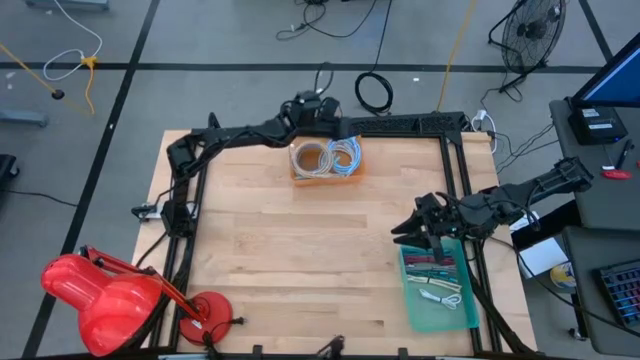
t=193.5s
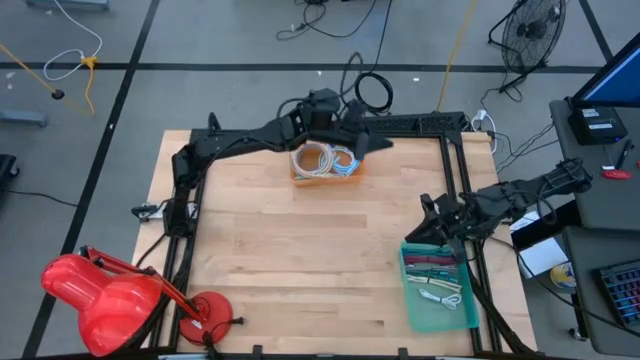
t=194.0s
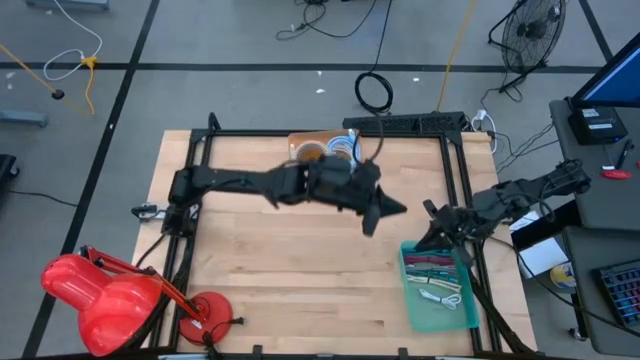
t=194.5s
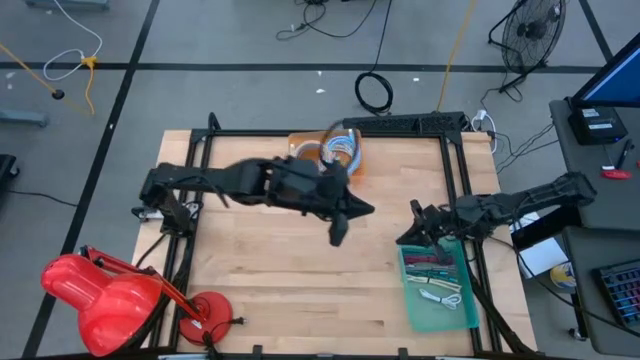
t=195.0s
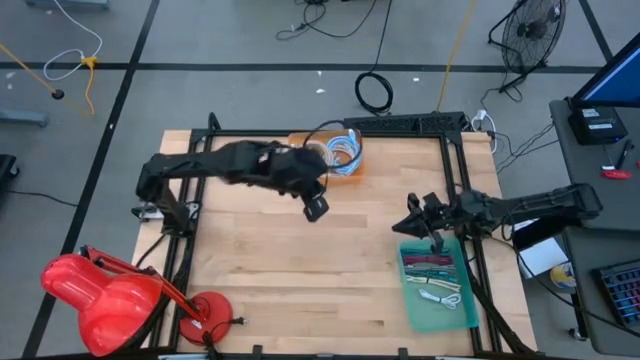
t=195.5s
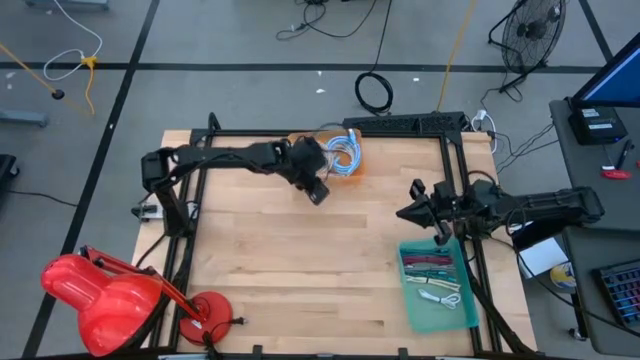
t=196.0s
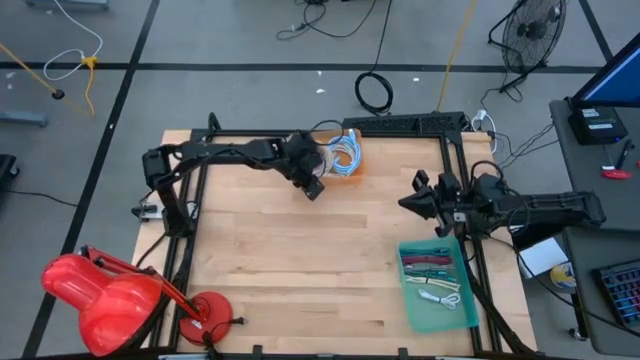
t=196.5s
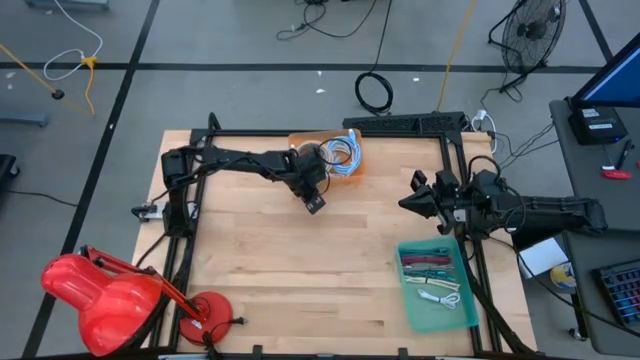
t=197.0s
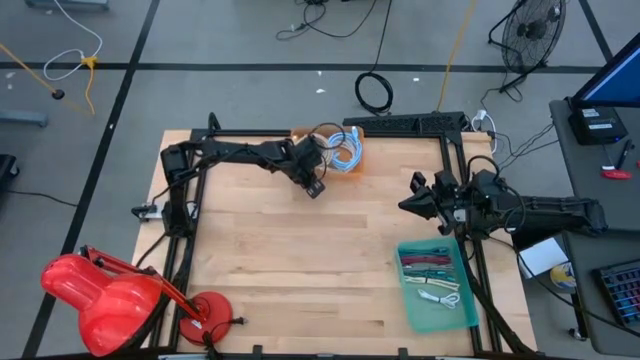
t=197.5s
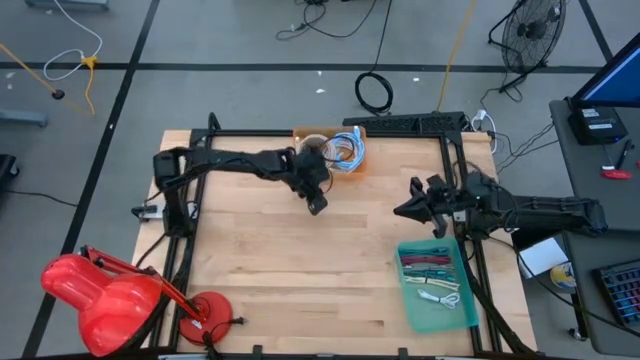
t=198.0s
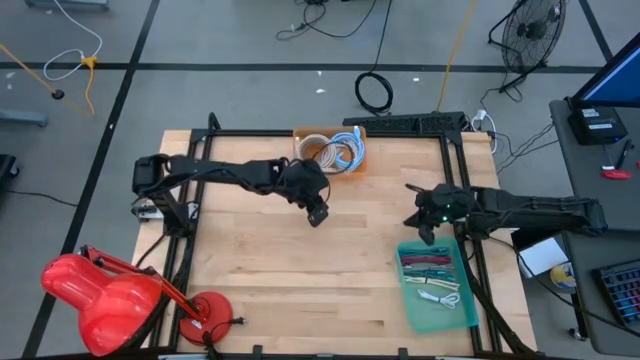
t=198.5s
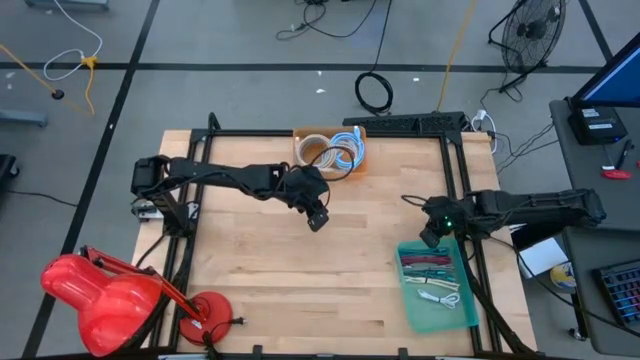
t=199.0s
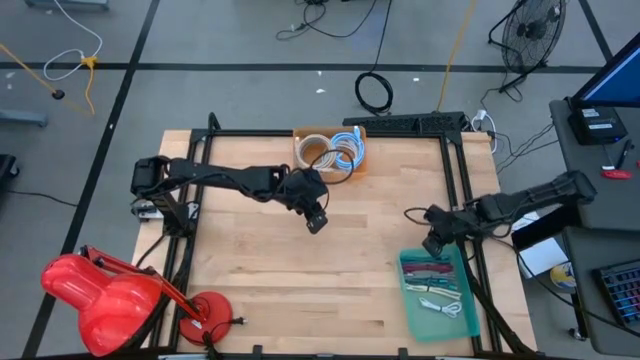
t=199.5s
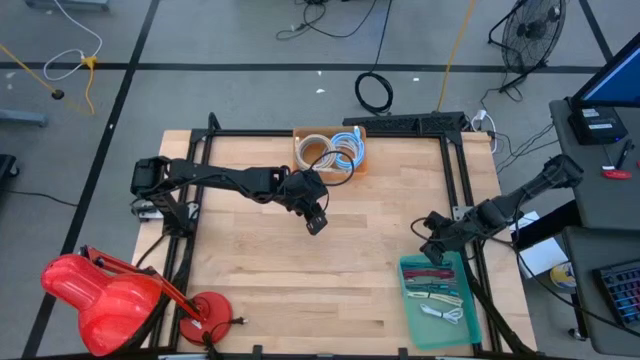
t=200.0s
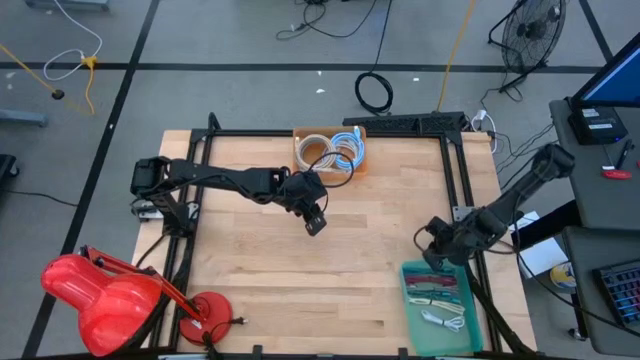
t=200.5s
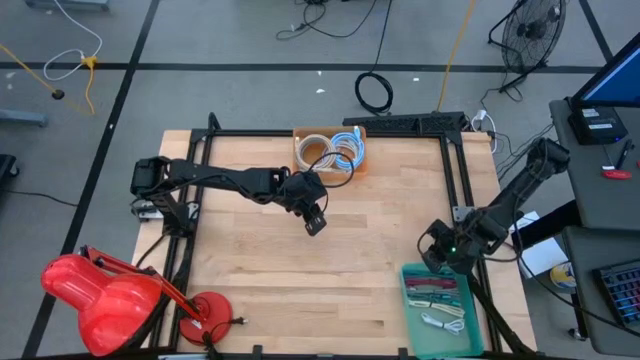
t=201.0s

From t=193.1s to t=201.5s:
Task: Pick & Place USB Port
Adjust the bins

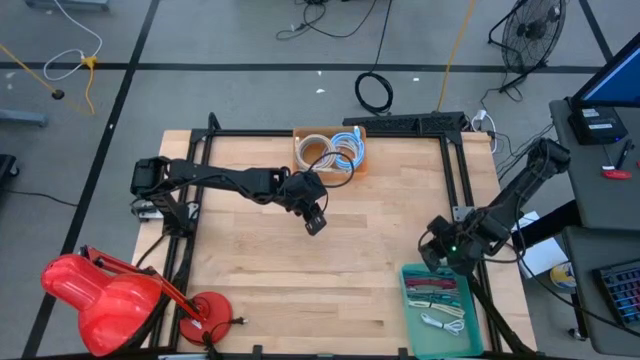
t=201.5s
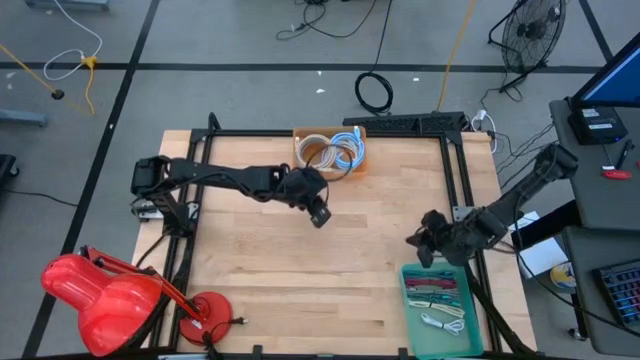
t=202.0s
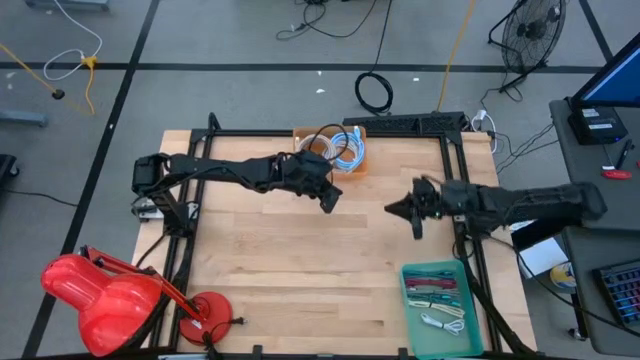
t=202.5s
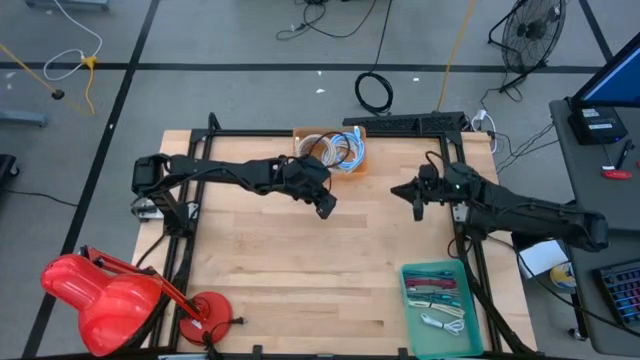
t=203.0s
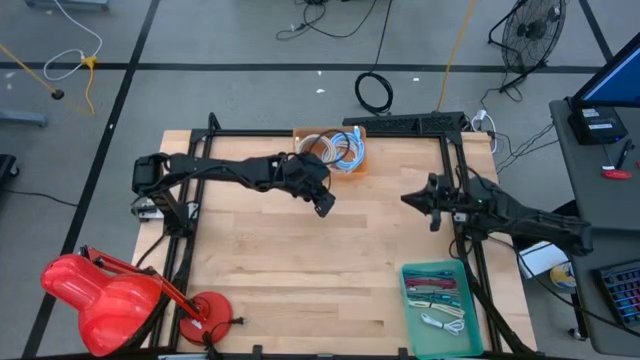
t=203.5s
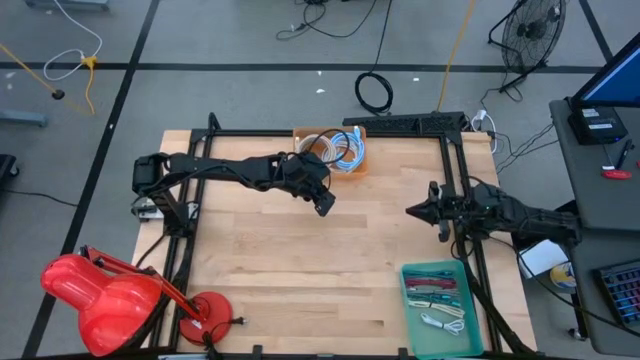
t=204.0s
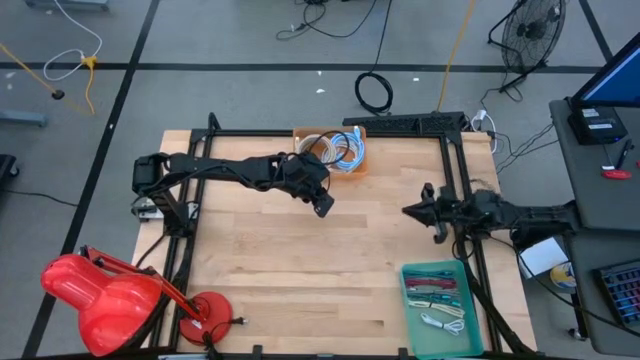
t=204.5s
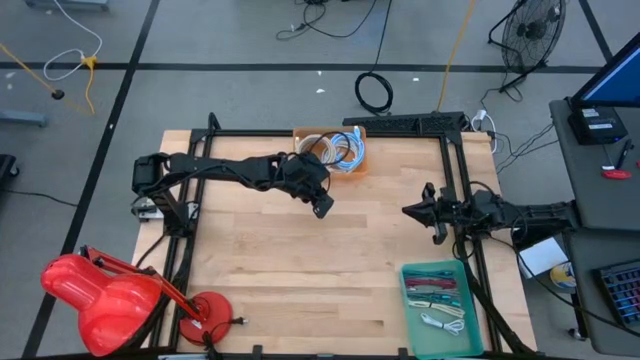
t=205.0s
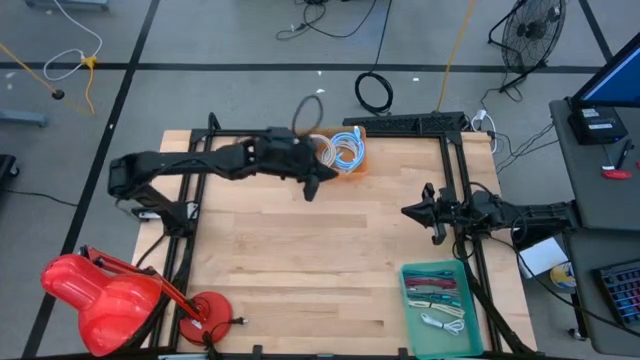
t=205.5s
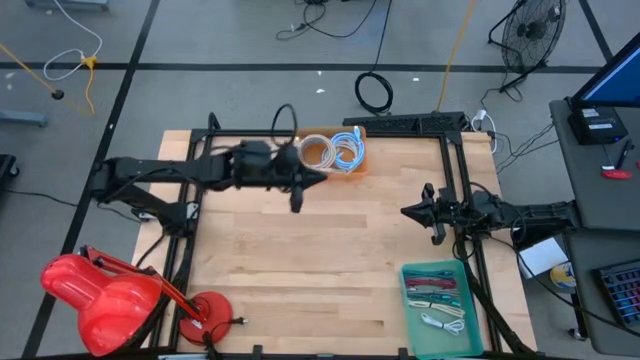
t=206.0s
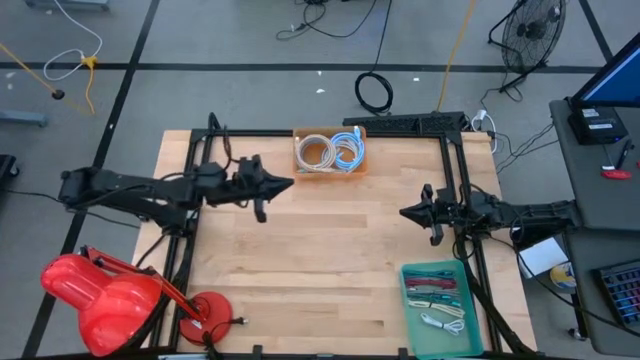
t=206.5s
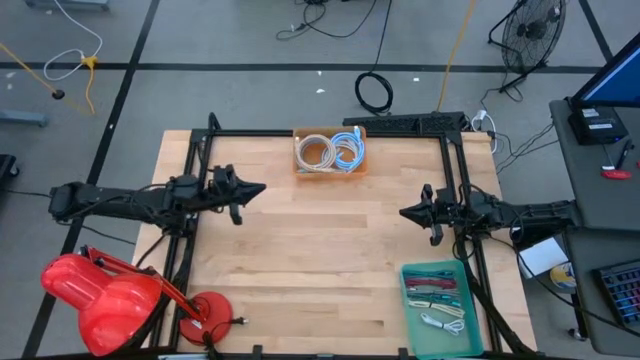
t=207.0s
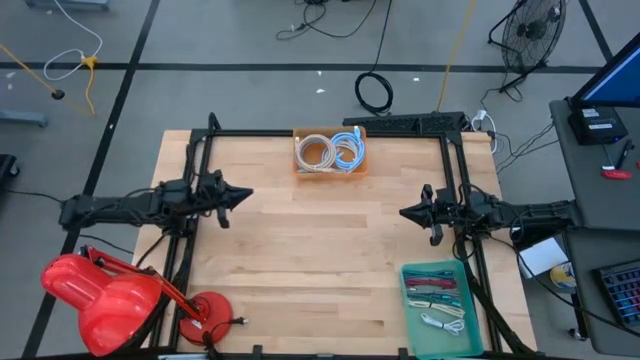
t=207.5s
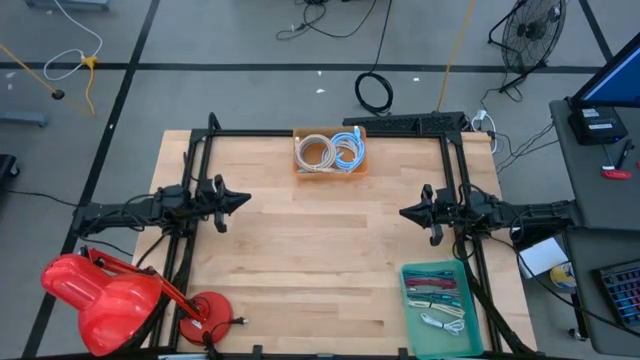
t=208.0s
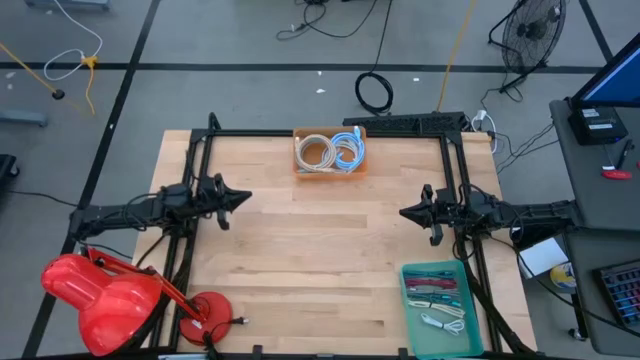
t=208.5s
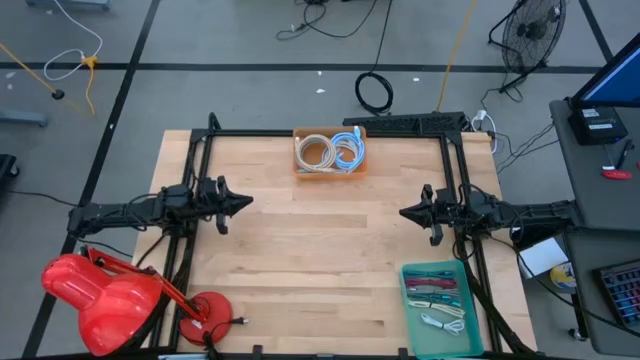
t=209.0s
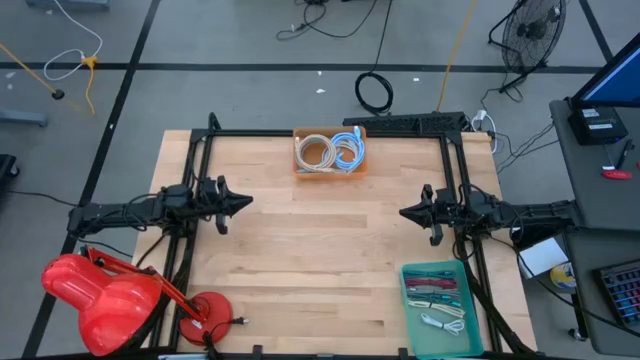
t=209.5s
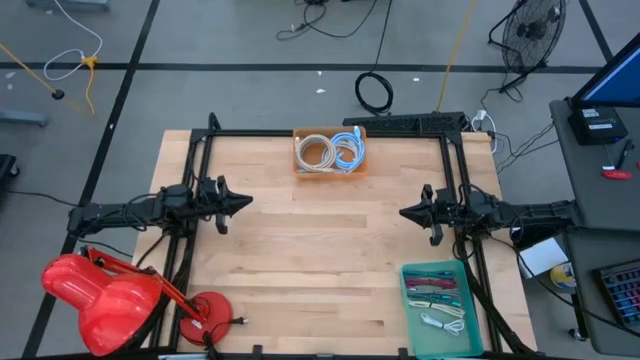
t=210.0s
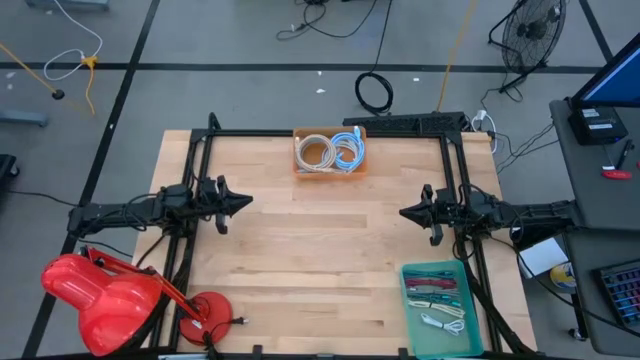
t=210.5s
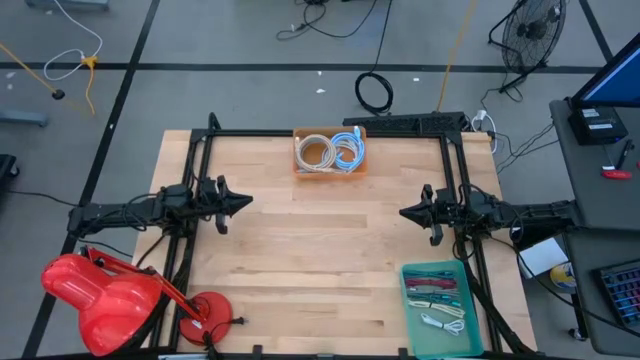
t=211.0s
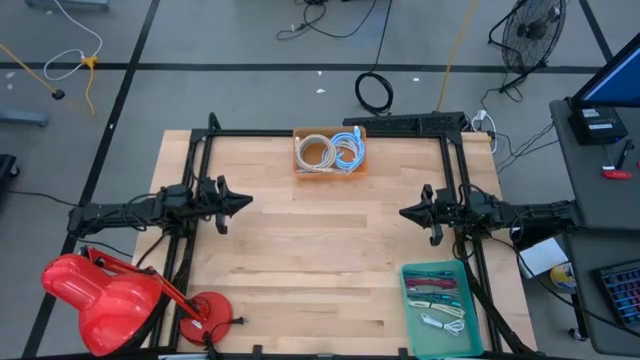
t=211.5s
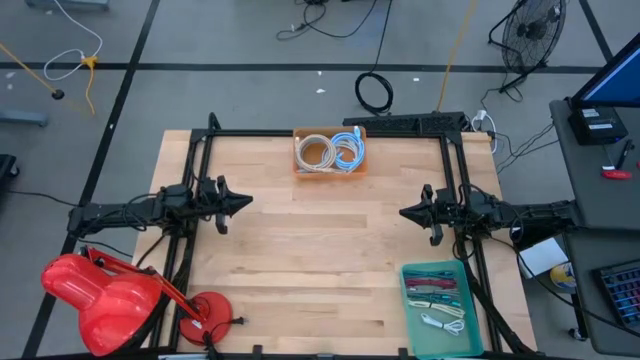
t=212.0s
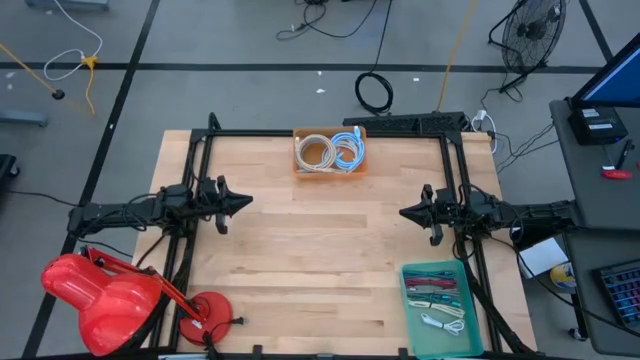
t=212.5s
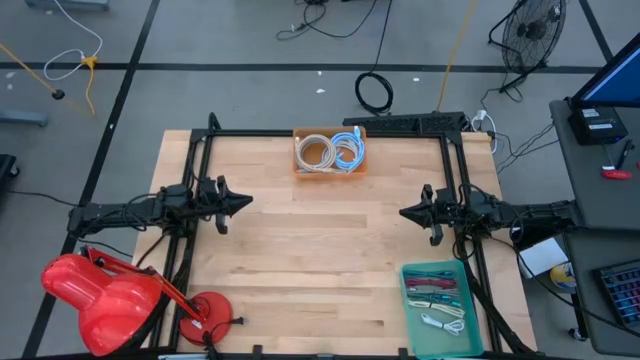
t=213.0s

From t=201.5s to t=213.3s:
Return to Home Position
